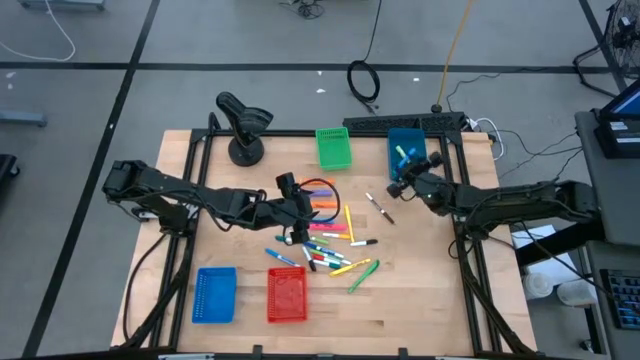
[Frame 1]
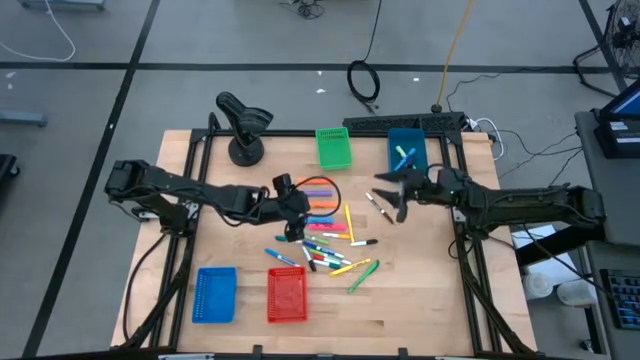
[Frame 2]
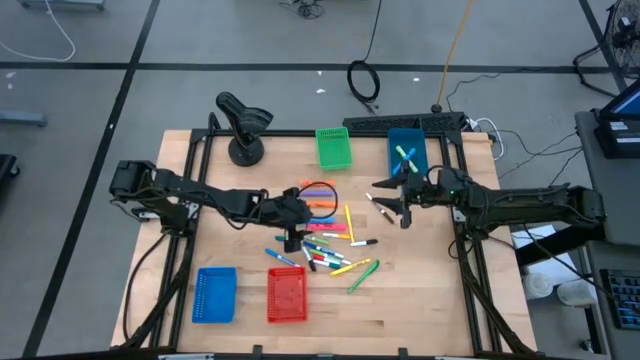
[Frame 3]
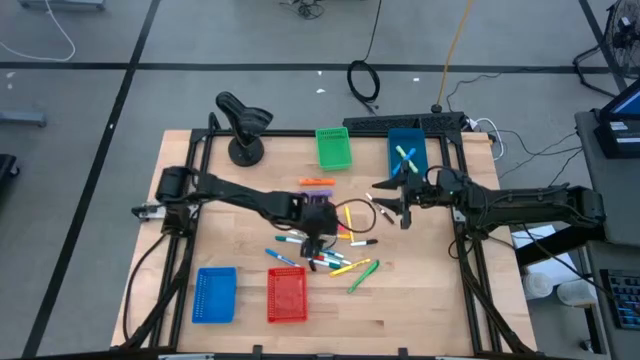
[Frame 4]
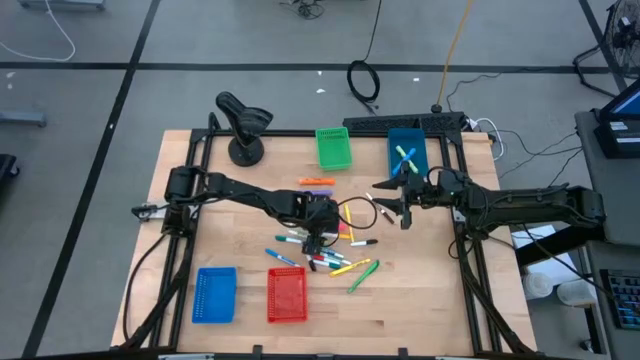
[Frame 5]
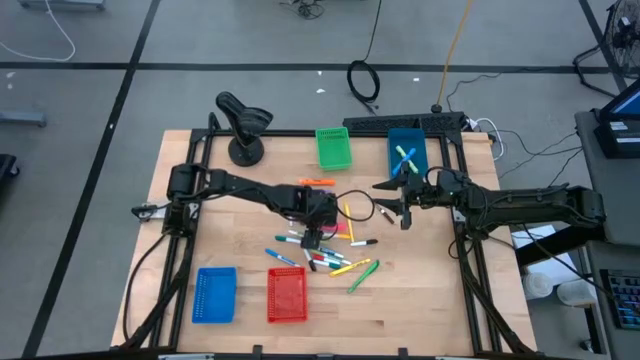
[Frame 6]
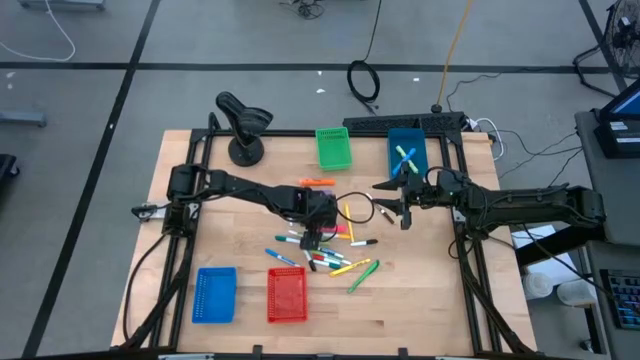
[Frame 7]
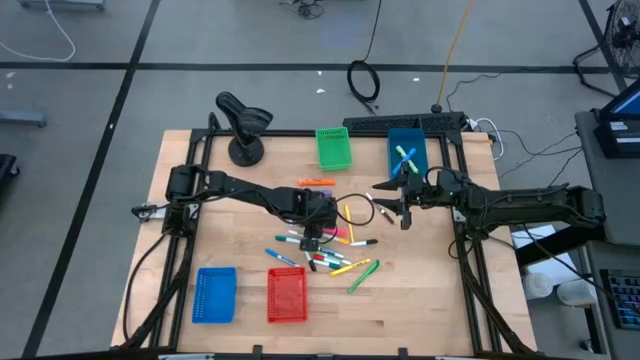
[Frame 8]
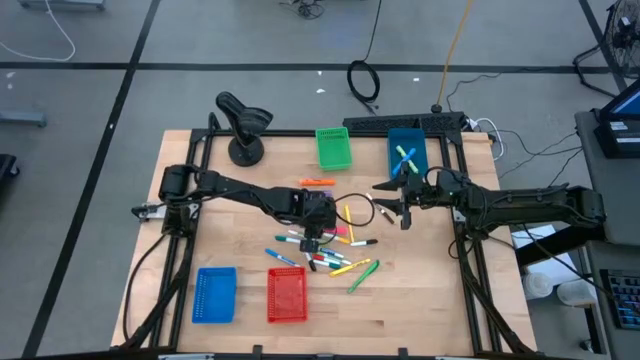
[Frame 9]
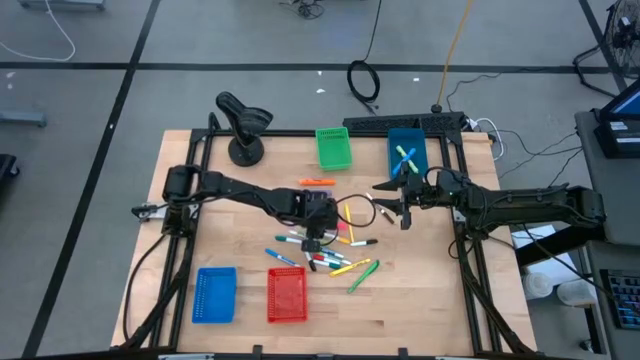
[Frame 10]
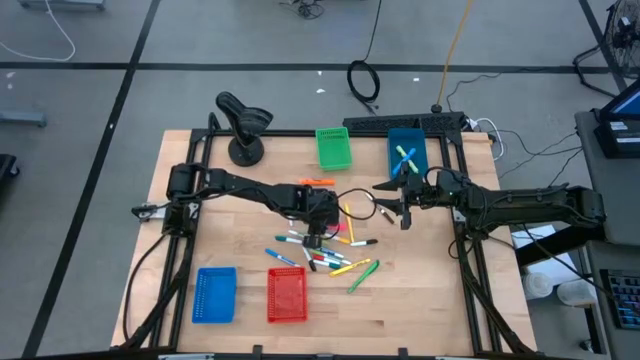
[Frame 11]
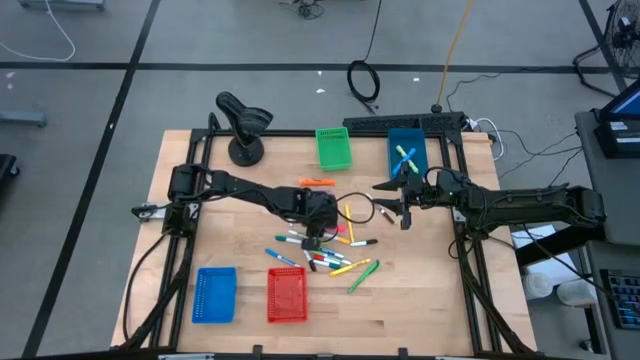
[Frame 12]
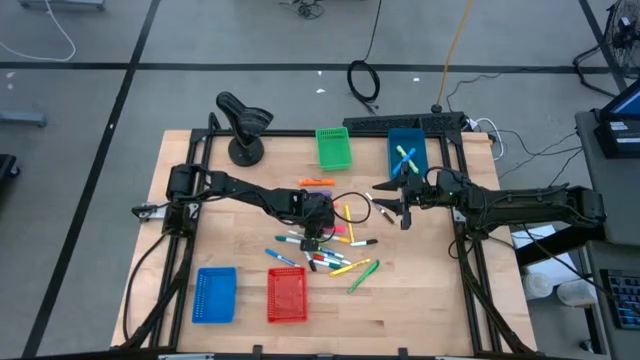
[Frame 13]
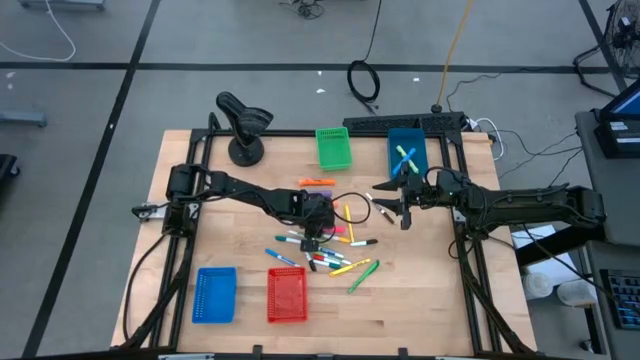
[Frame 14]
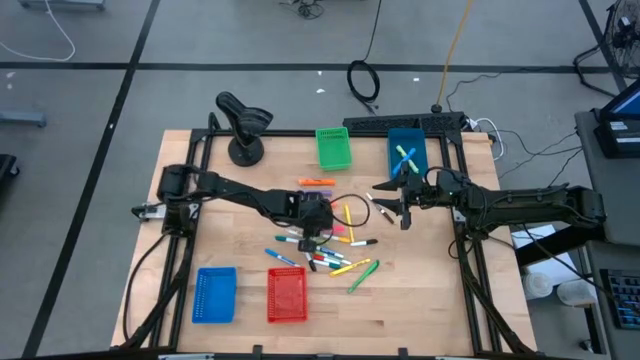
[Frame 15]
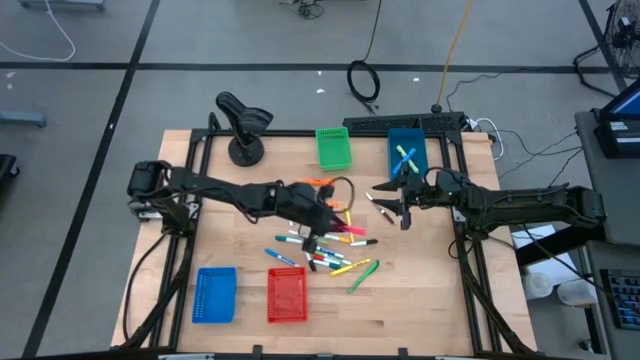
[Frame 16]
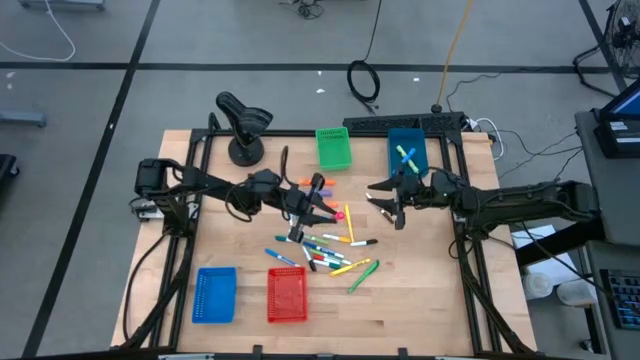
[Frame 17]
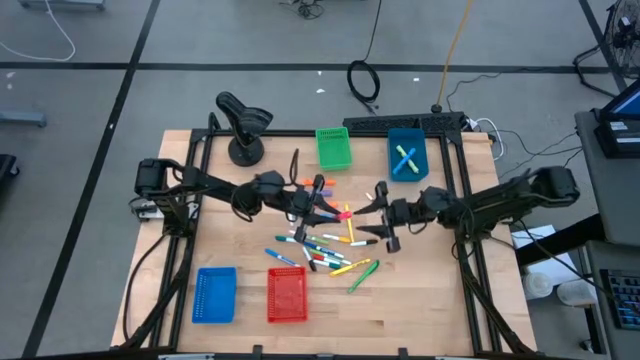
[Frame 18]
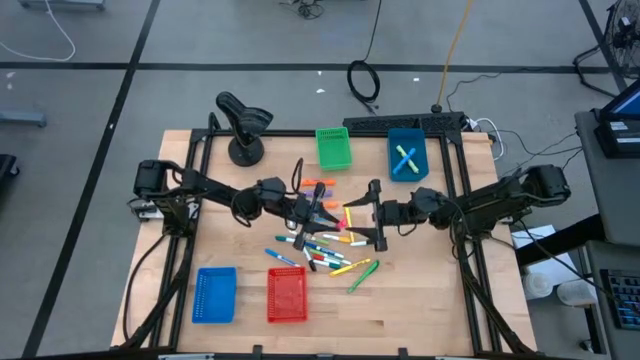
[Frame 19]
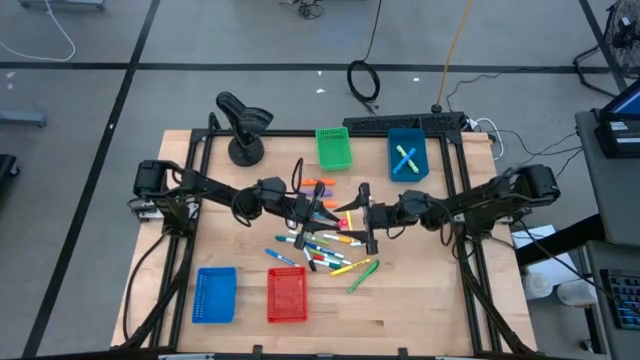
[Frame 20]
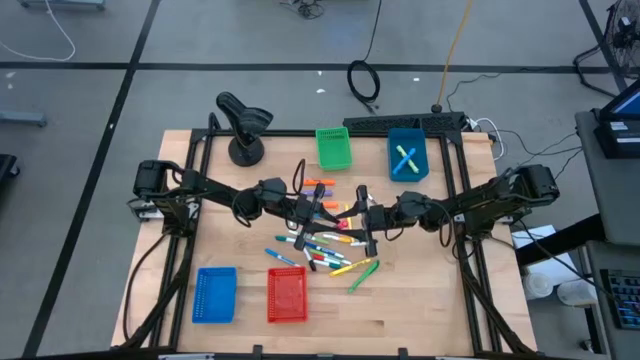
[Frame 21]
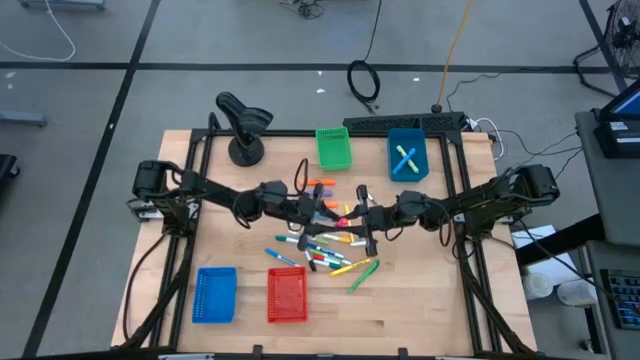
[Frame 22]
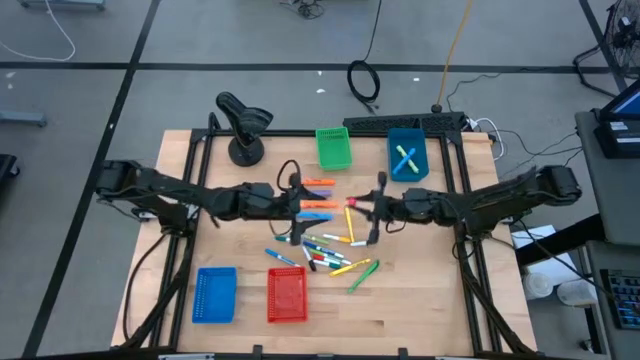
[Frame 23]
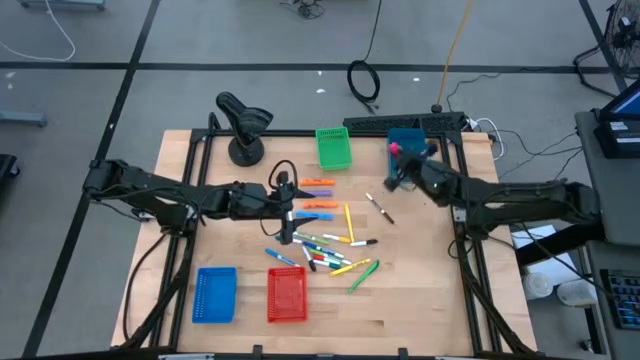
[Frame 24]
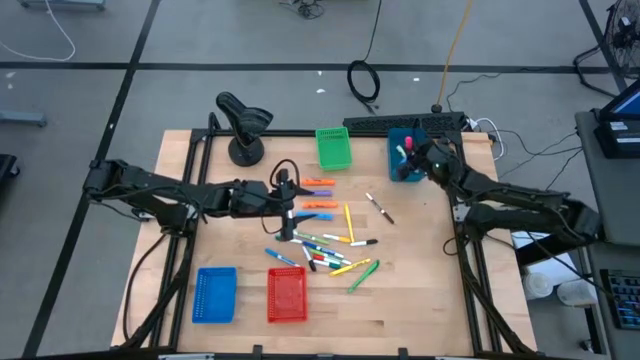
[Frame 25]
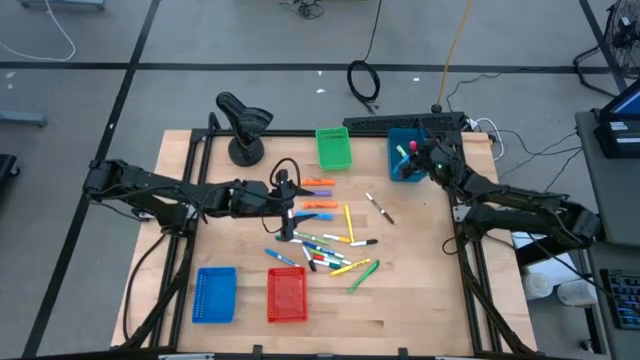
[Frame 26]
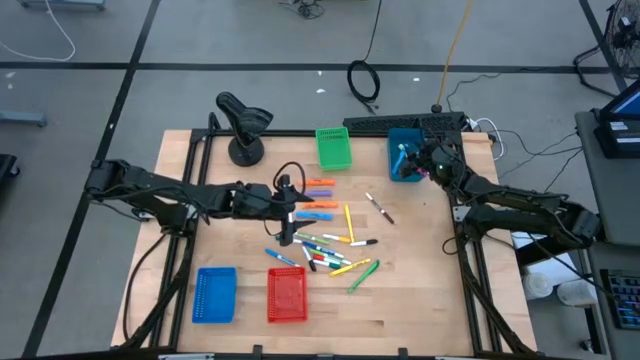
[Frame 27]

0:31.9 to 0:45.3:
Task: Pick & Place Markers
Put the pink highlighter into the dark blue bin

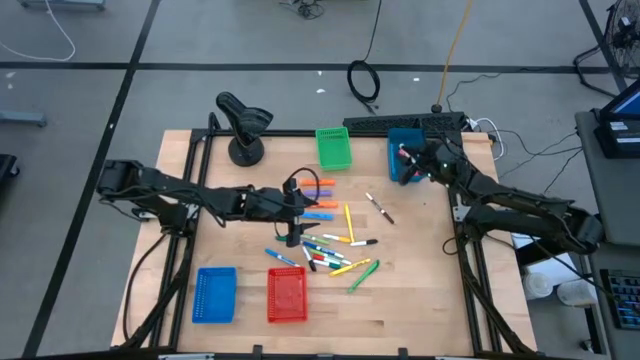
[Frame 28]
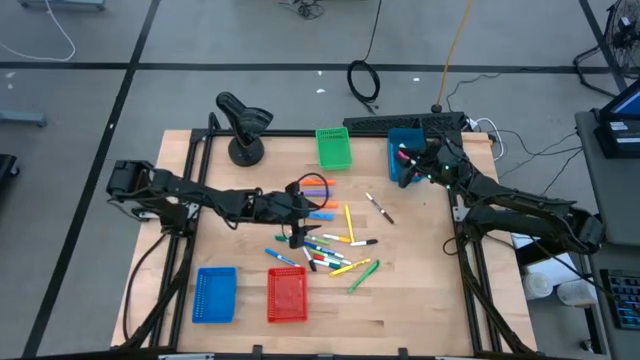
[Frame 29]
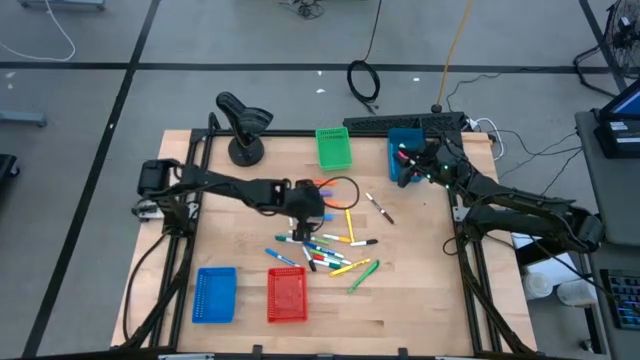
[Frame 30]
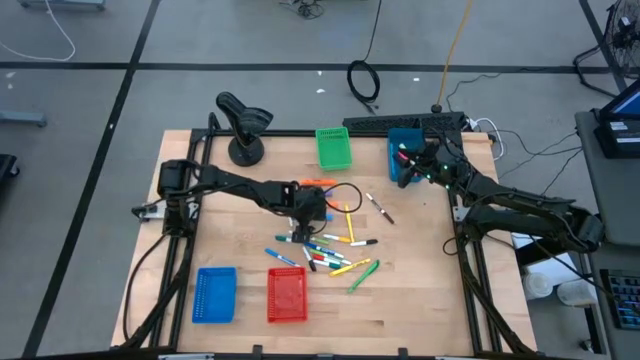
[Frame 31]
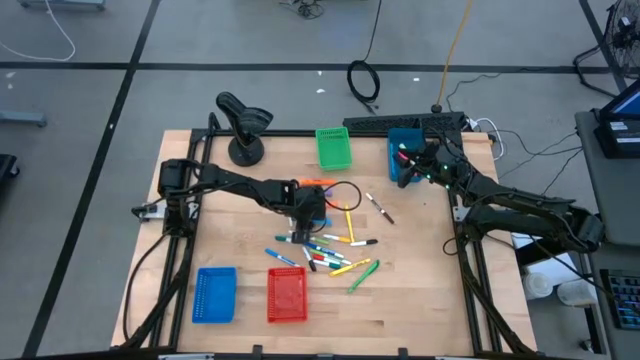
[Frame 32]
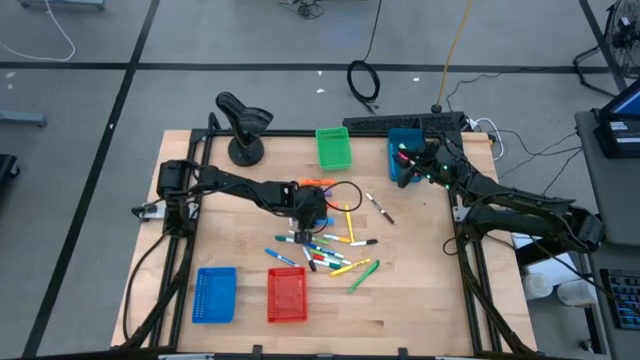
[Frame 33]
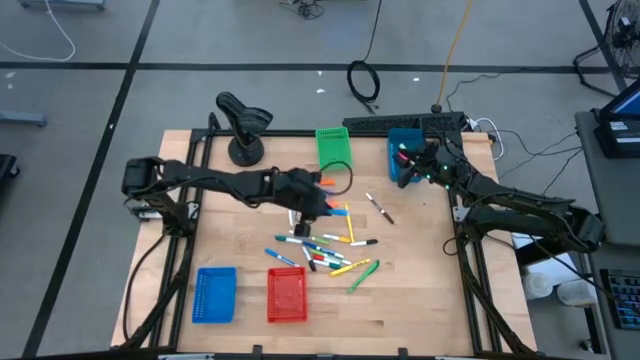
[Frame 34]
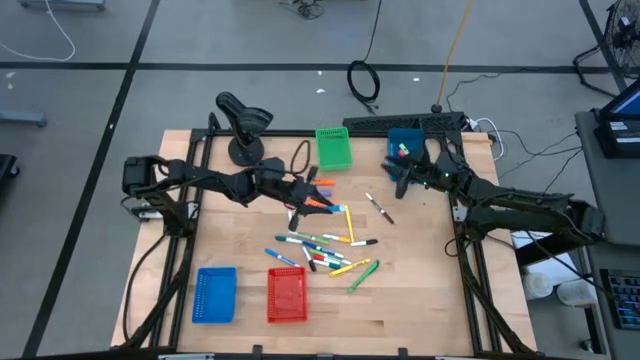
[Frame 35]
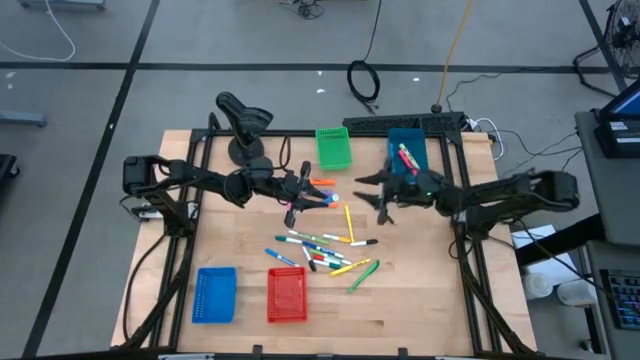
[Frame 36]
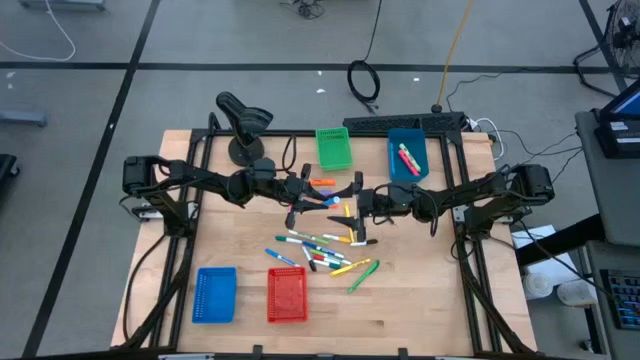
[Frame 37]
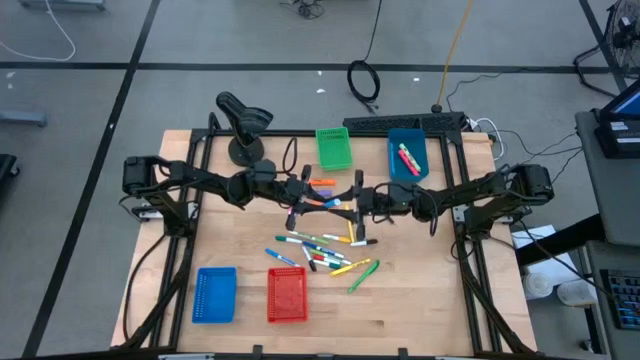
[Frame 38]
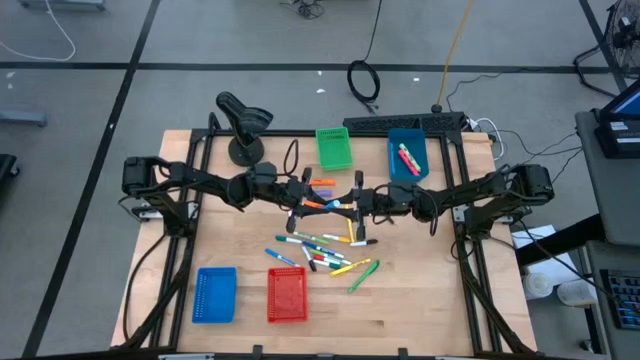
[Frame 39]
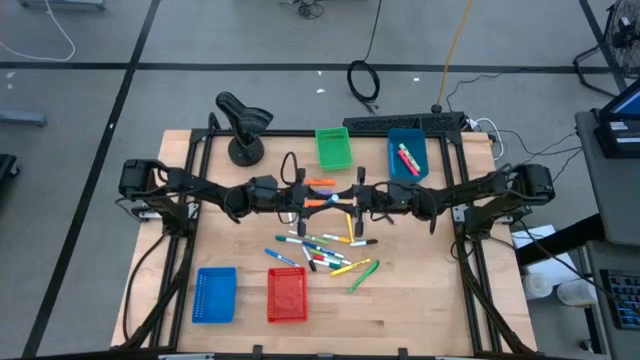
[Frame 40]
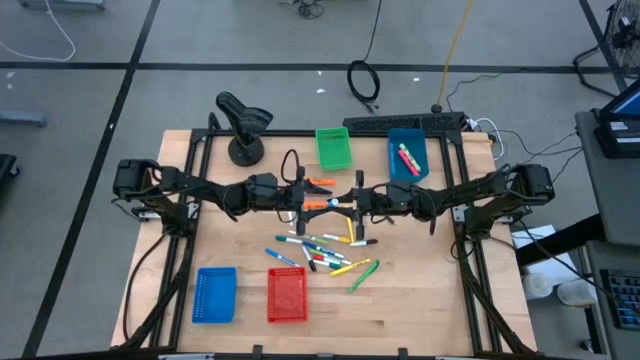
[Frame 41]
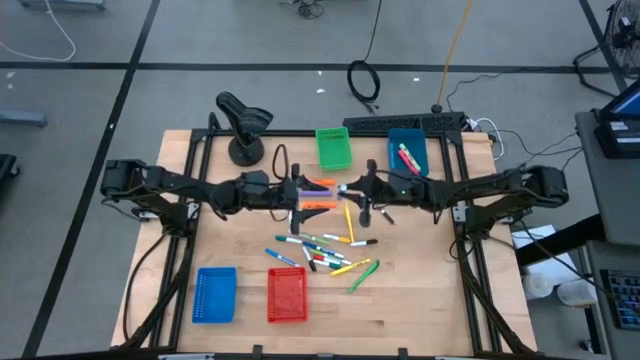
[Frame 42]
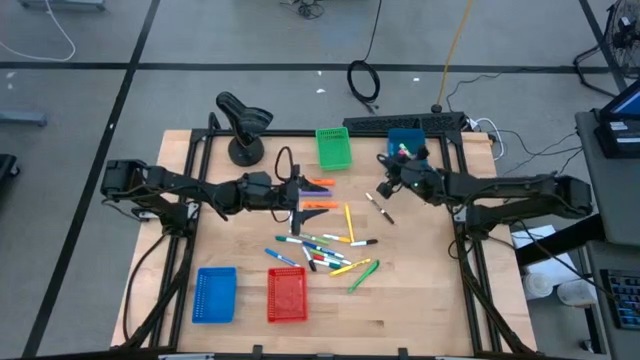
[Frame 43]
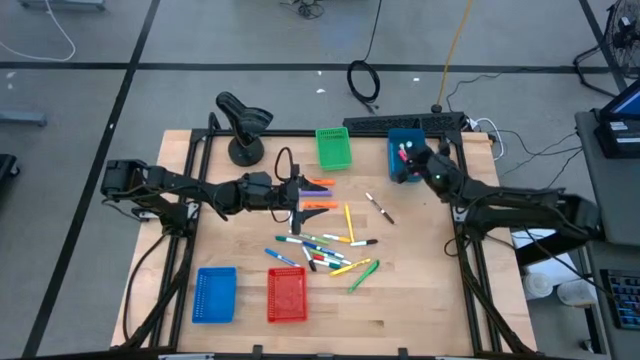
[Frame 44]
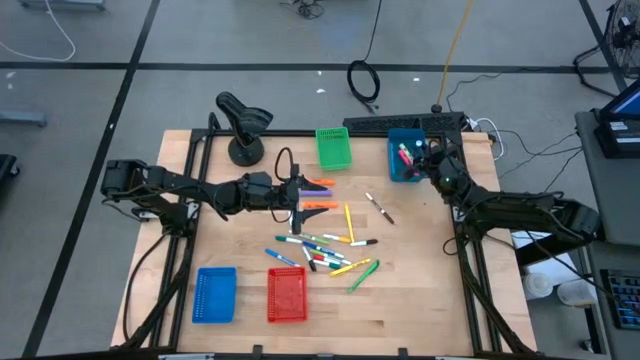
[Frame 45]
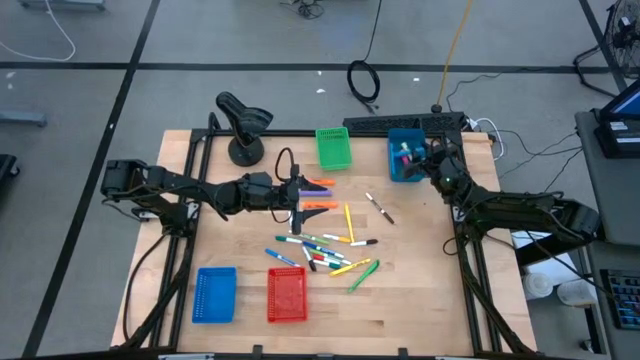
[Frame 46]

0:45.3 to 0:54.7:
Put the blue highlighter into the dark blue bin
